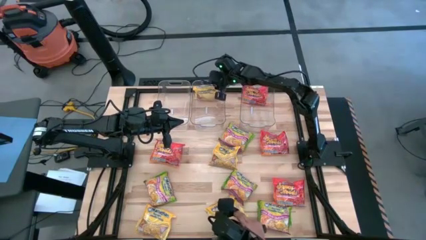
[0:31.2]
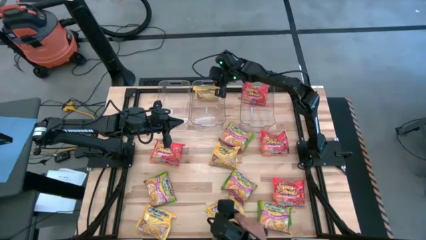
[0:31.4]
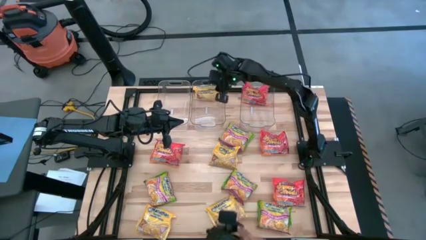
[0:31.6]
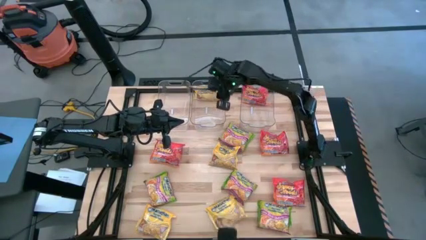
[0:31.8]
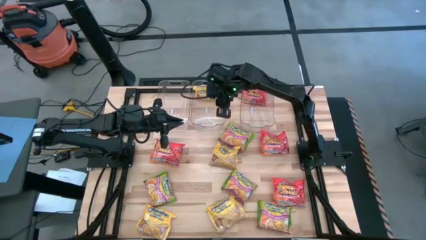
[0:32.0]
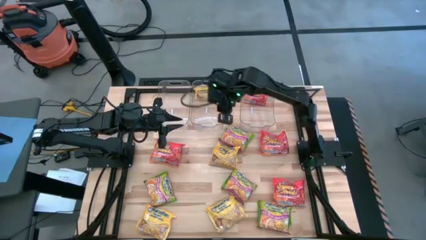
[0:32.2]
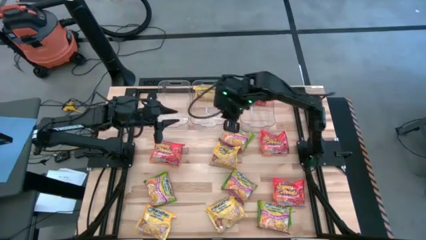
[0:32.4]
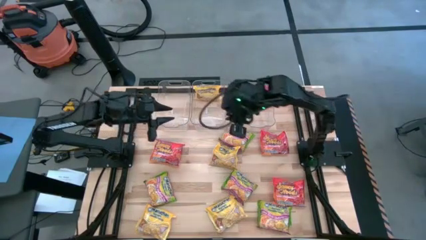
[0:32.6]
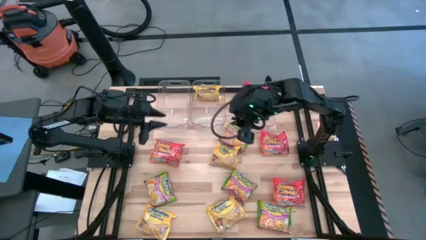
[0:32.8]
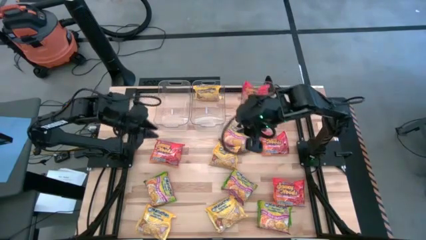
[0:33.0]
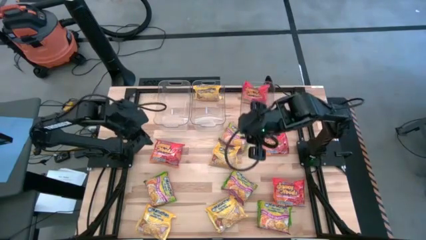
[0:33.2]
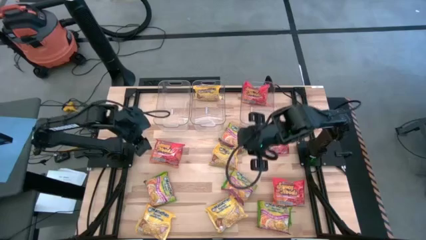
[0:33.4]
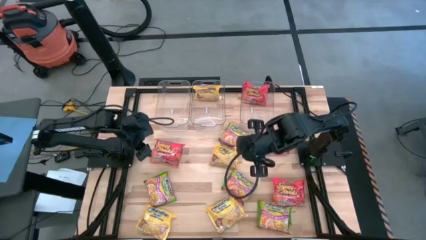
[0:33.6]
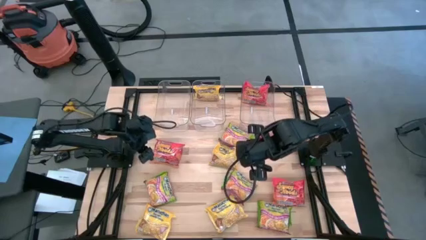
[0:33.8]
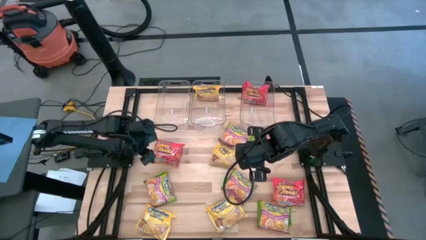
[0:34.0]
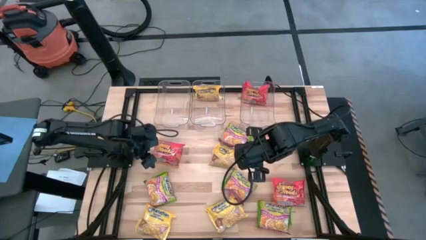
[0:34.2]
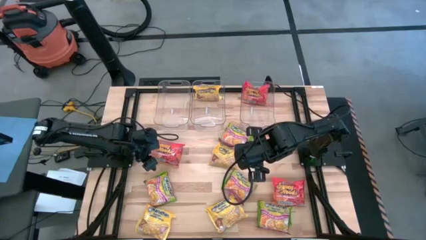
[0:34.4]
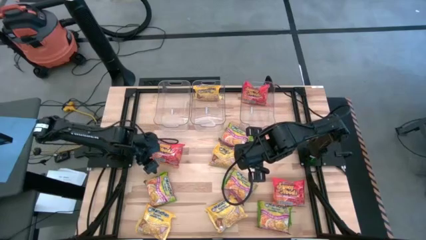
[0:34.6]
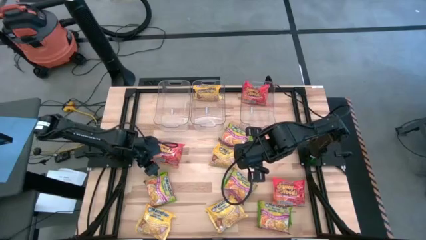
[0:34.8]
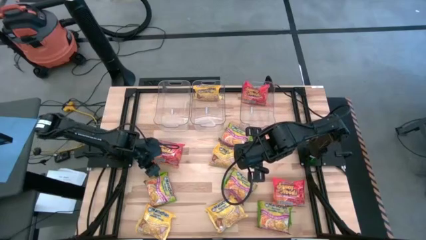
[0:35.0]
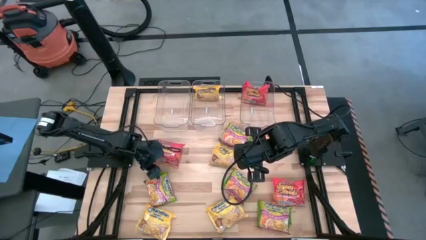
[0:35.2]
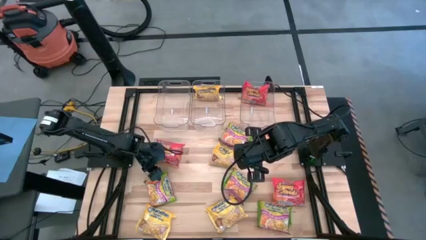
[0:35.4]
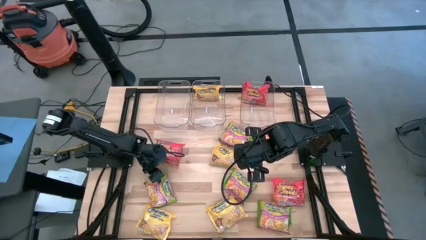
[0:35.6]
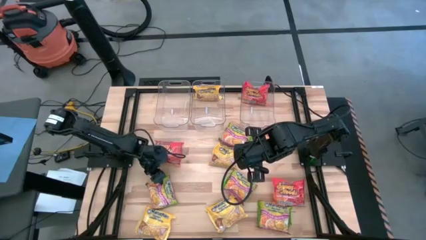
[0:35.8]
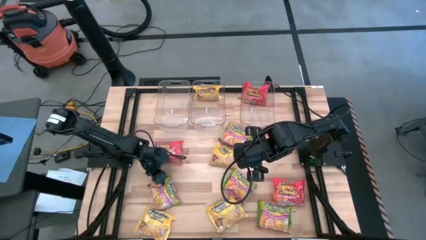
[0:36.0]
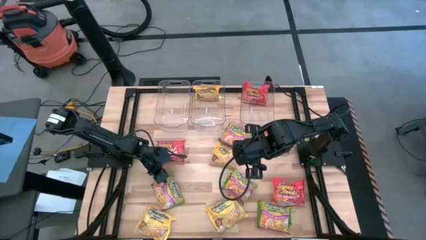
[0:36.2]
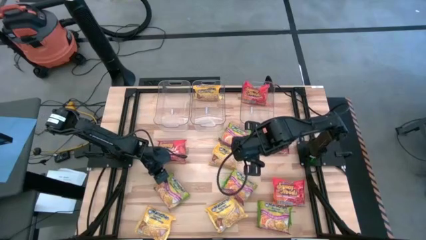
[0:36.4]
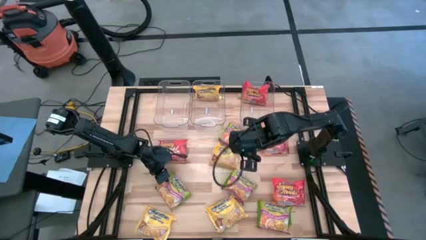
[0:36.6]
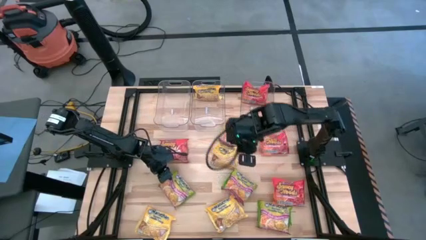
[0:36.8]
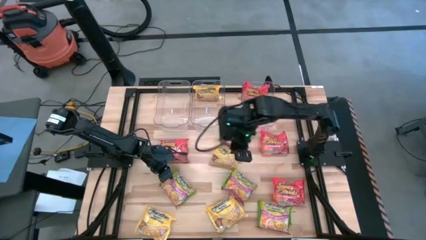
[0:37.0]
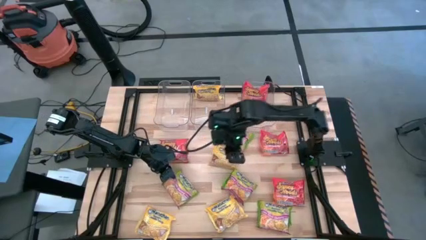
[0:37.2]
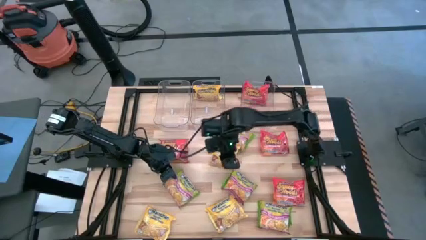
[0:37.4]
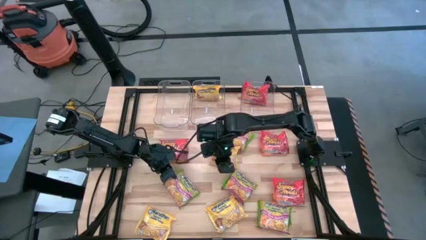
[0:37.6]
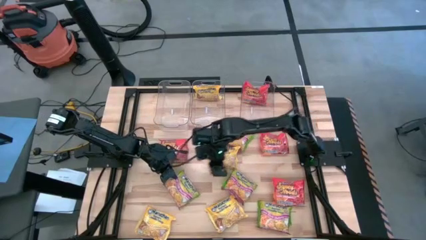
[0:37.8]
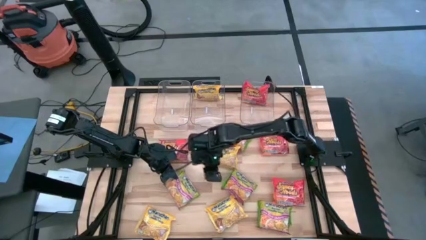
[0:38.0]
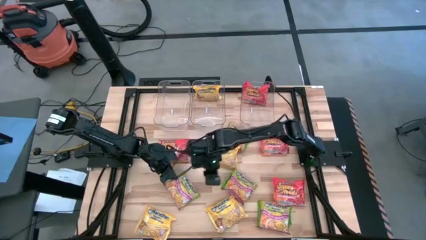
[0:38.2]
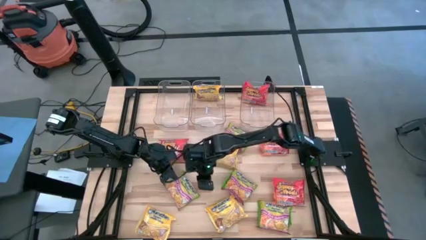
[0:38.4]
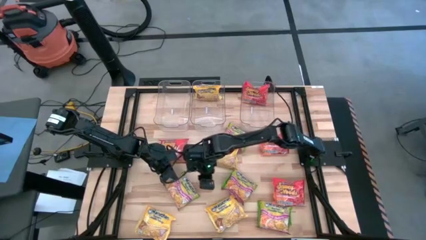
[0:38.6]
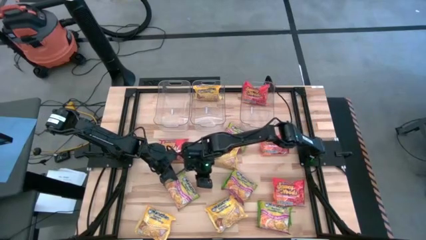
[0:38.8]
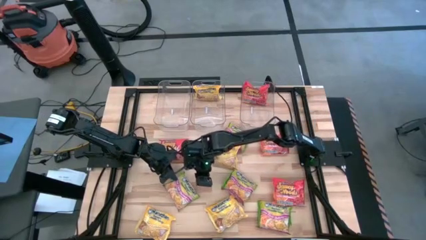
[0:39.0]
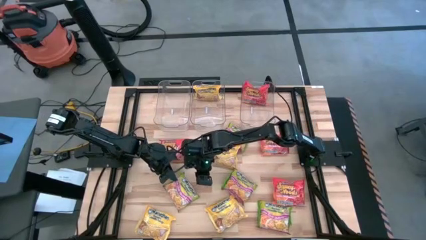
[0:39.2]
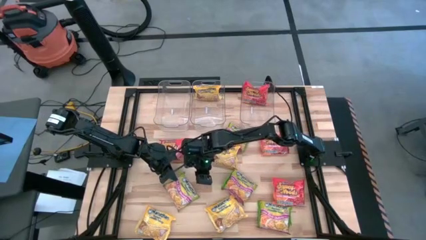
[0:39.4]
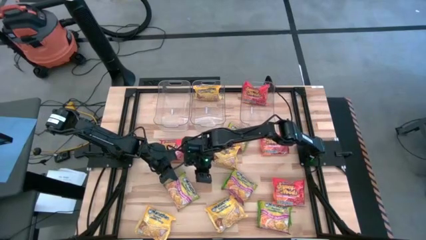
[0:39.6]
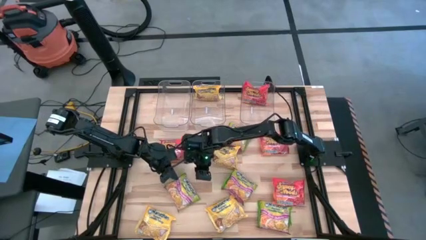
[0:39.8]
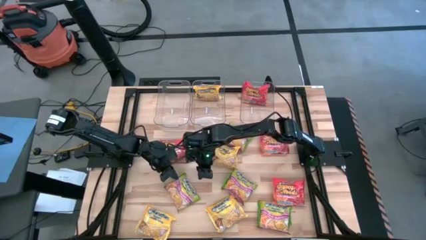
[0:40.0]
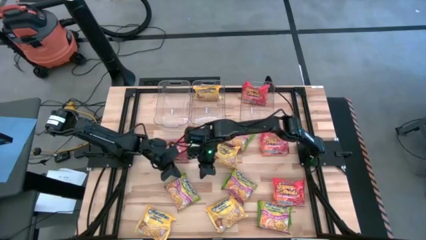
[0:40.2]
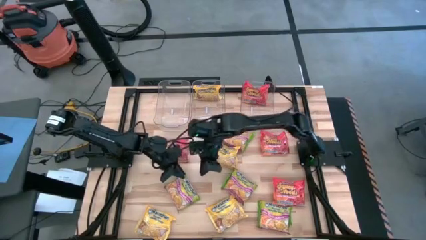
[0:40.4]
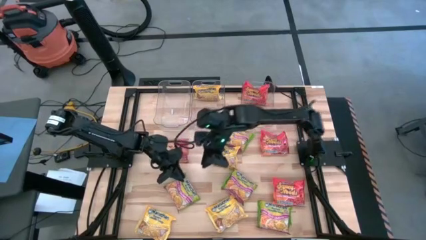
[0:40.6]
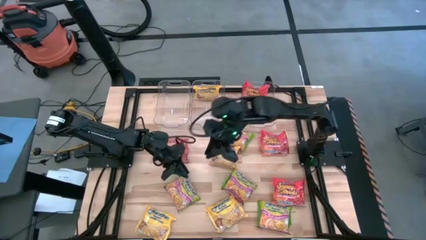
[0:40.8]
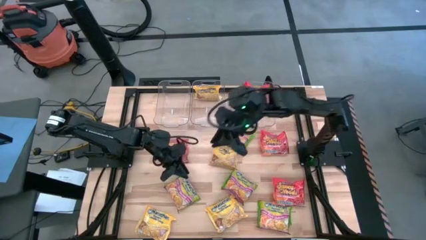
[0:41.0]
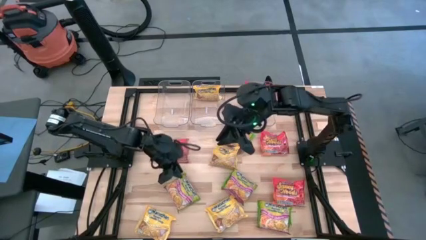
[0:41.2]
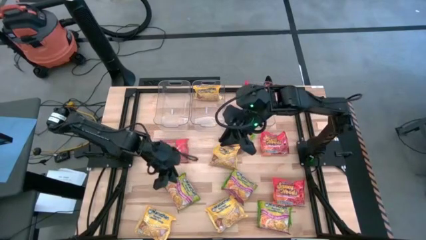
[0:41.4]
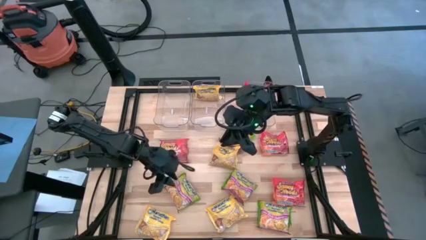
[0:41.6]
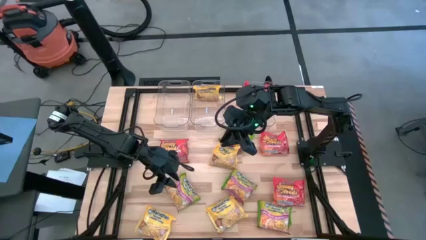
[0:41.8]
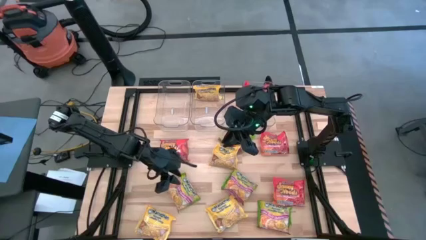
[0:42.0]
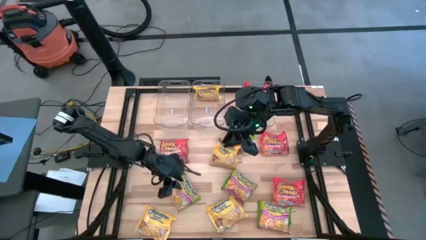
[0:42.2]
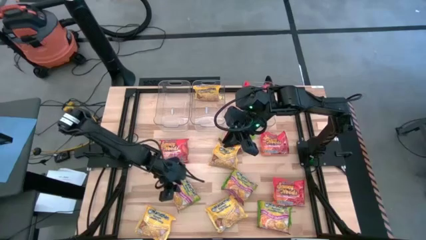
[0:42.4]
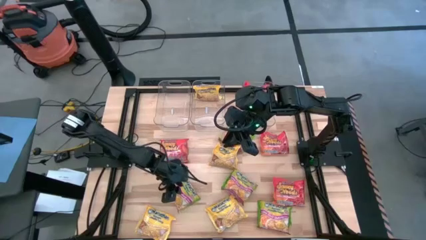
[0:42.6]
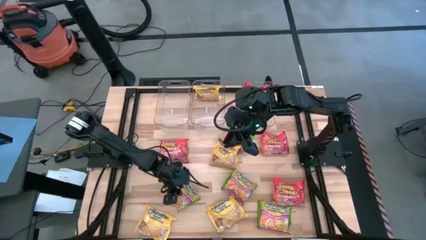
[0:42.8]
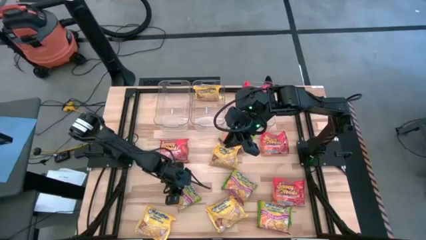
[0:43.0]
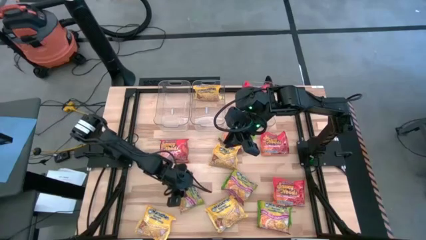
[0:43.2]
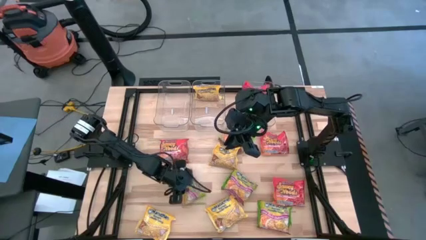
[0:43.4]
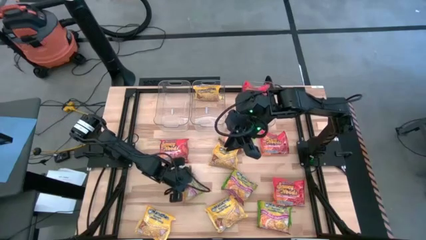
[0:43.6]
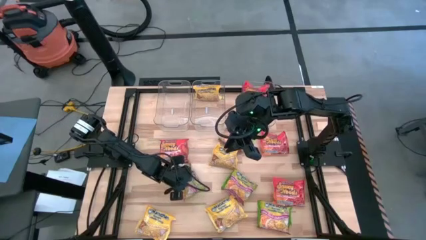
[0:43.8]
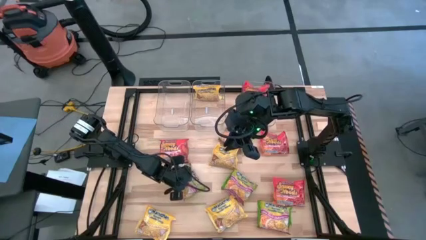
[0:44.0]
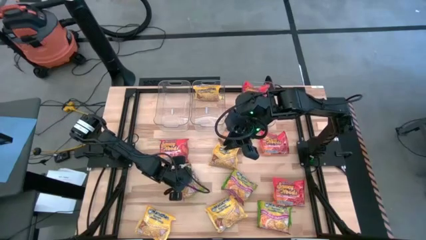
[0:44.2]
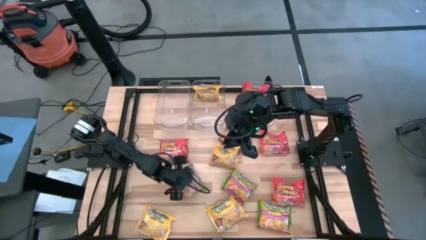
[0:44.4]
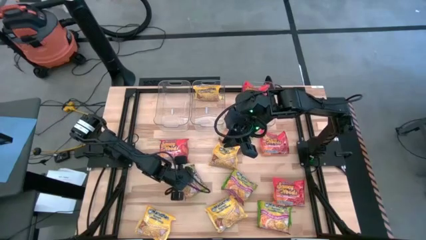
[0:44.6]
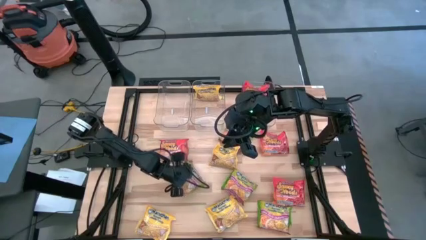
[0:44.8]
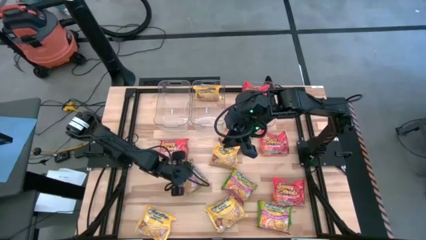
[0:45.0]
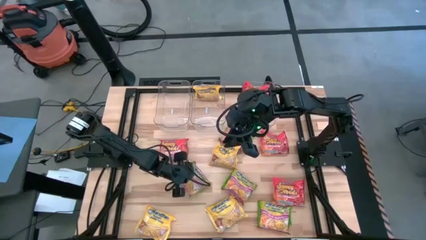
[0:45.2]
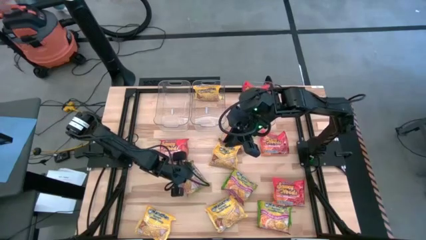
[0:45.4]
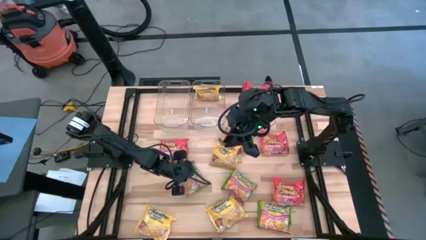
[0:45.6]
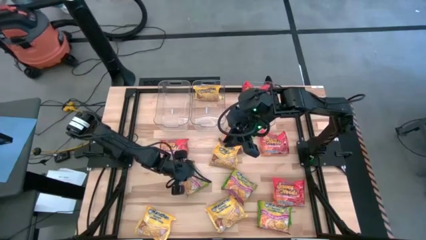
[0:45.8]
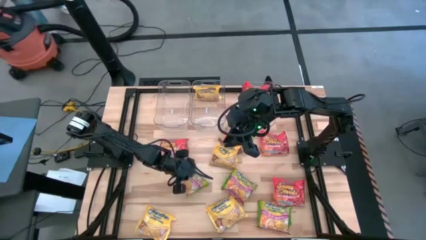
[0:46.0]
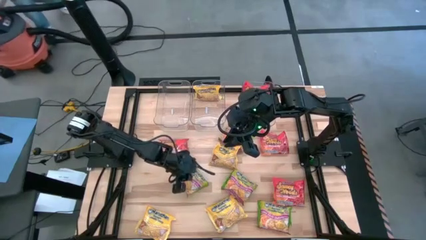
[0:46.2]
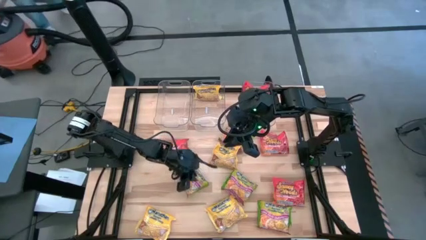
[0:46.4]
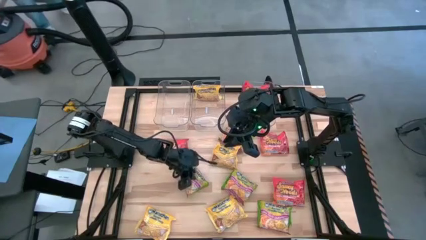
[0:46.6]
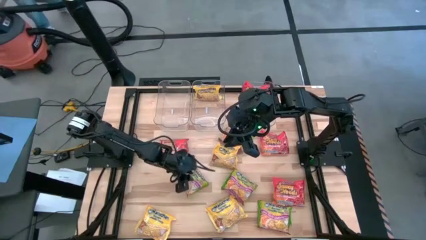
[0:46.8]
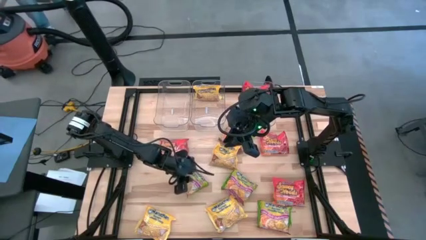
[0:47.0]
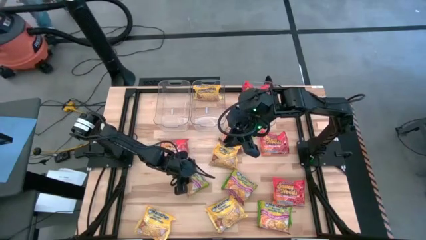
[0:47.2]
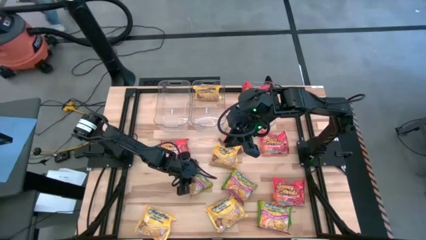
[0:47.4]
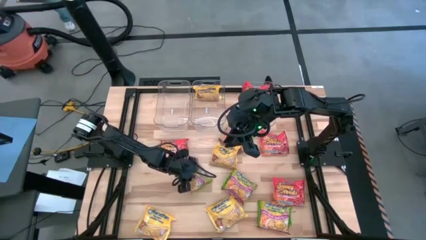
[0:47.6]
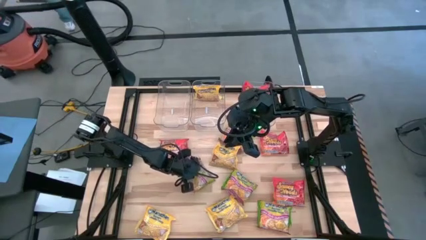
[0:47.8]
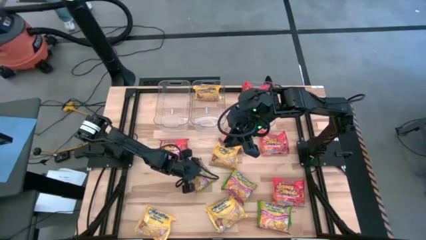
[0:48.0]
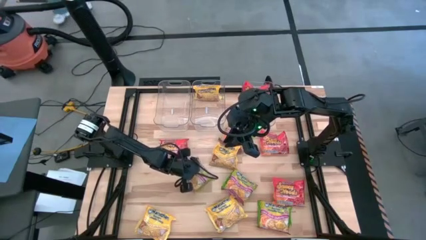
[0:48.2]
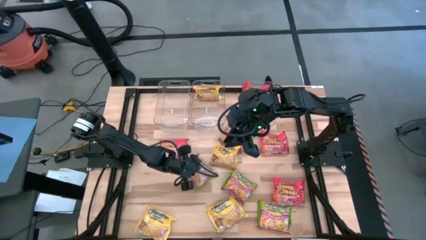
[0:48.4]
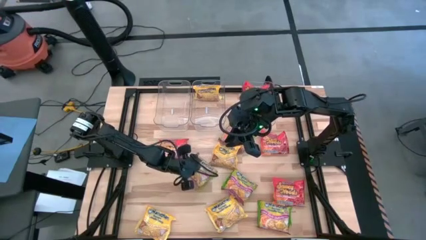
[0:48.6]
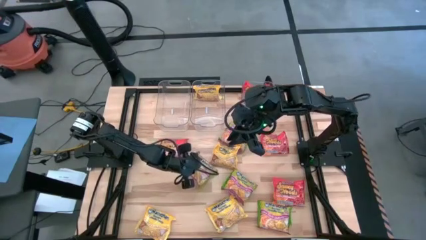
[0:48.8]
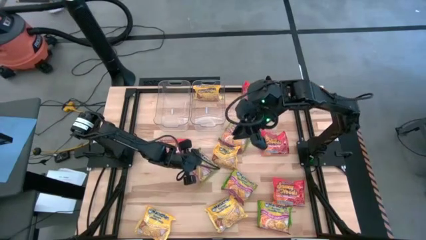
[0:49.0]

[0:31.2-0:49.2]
Task: Sort Maruchan noodles
Put the green noodle pack into the left transparent bin
